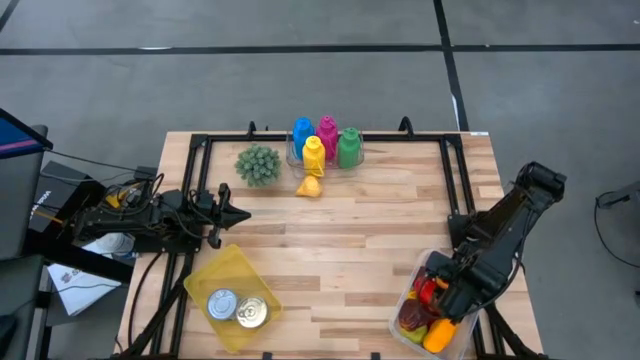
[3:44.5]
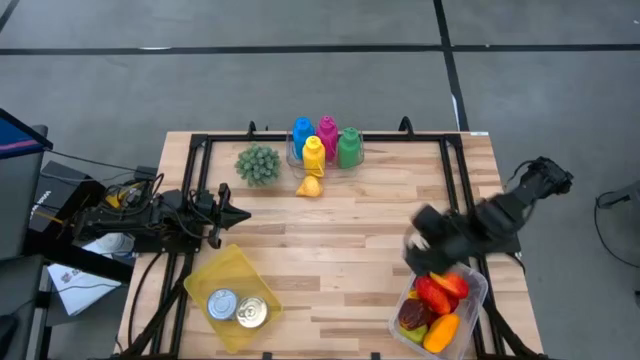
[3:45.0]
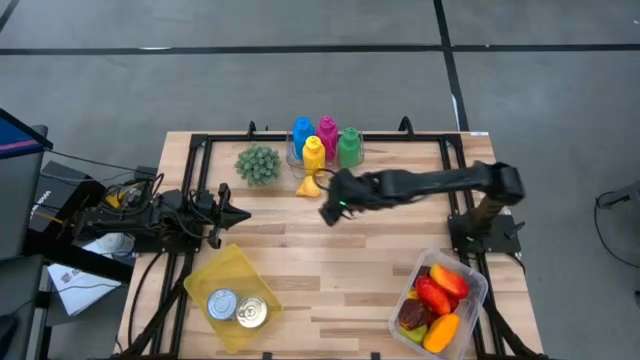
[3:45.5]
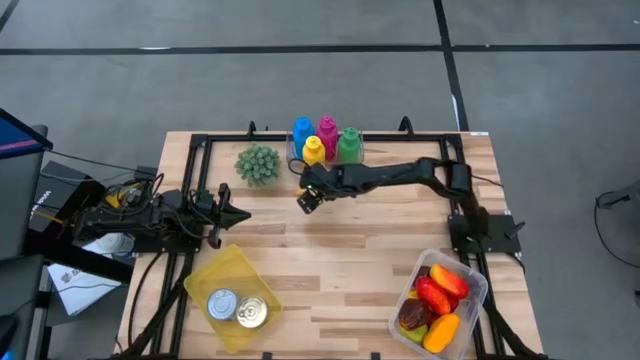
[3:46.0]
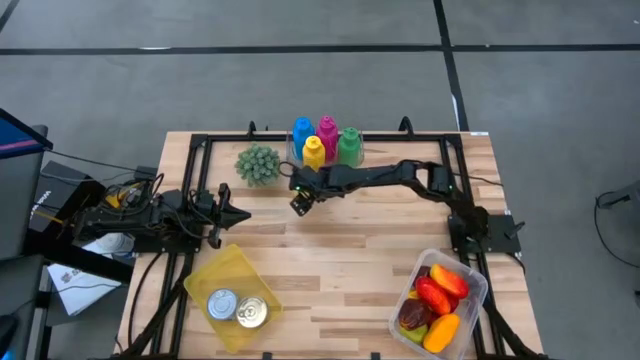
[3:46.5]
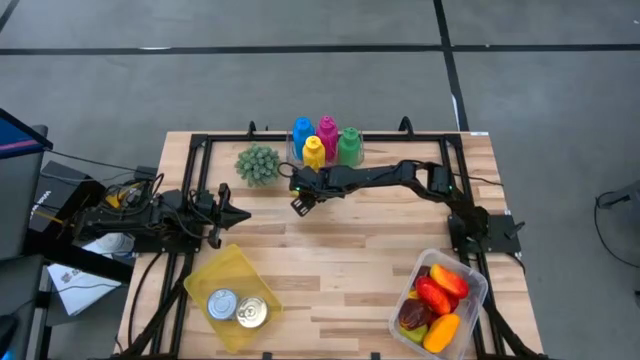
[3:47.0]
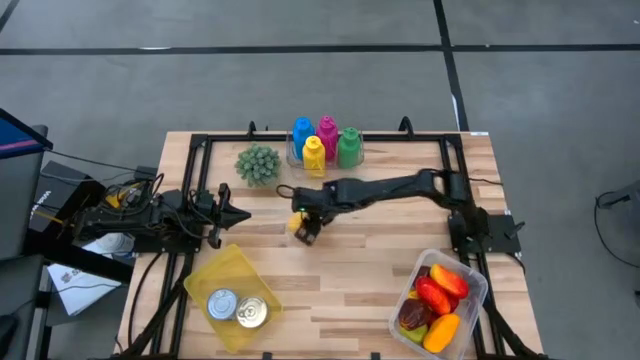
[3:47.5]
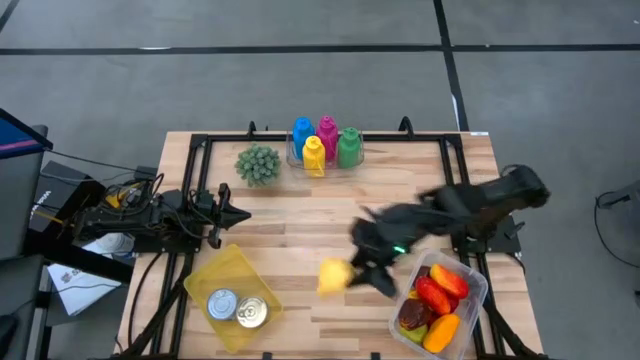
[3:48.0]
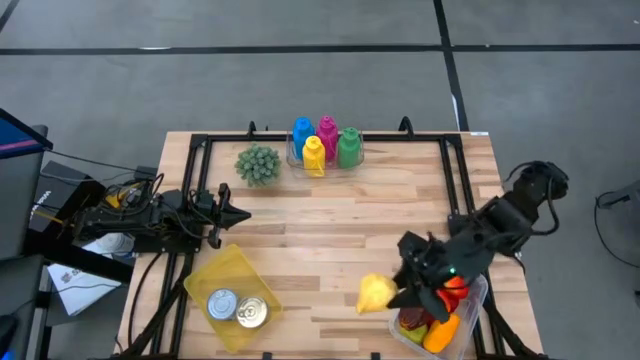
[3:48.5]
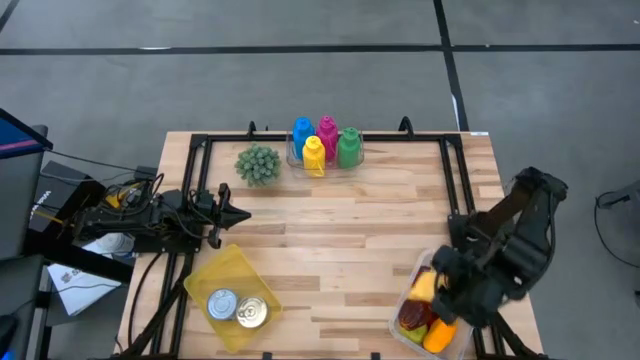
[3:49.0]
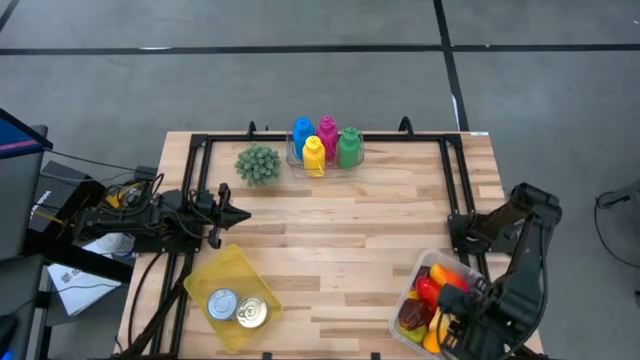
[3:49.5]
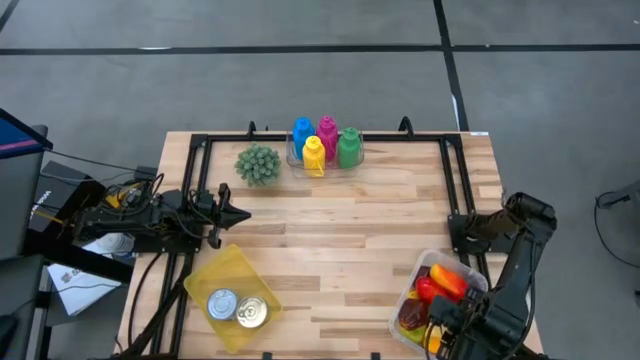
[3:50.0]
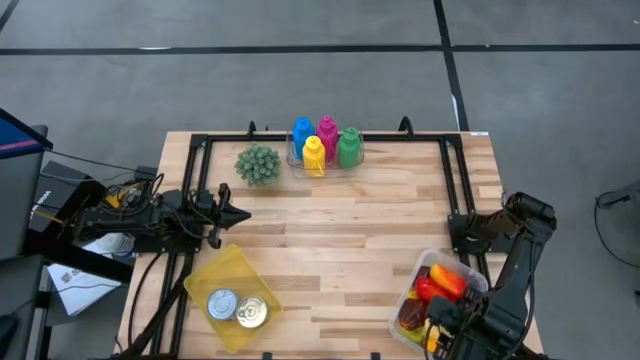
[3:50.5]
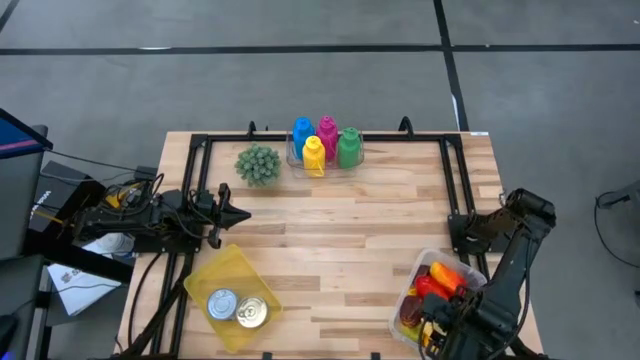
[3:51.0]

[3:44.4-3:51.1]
Task: Pick & Place Food Item
Put the yellow garlic into the white bin

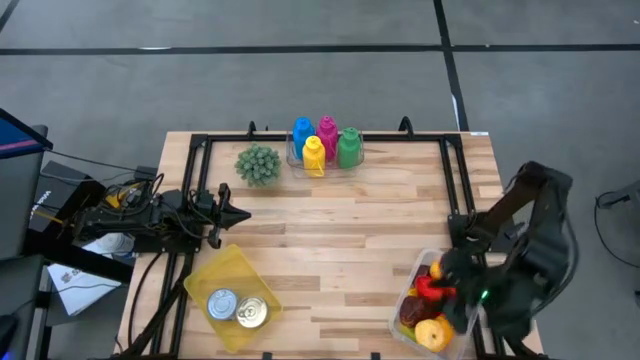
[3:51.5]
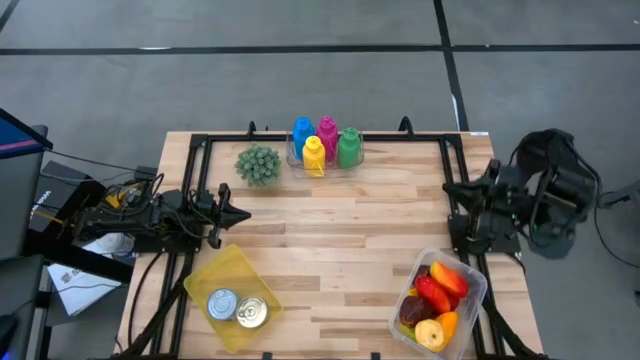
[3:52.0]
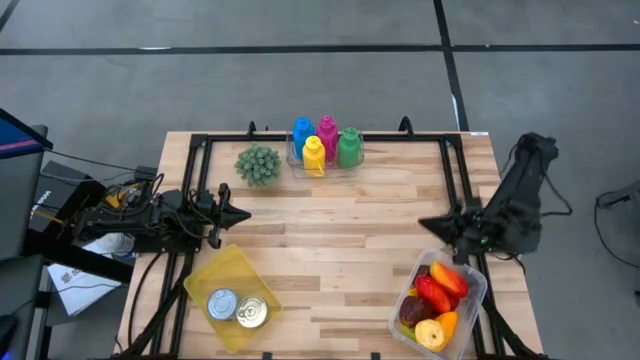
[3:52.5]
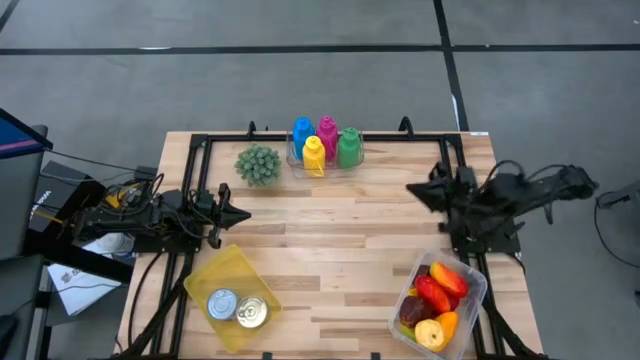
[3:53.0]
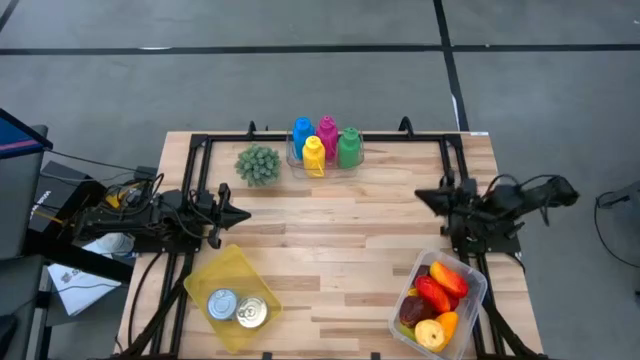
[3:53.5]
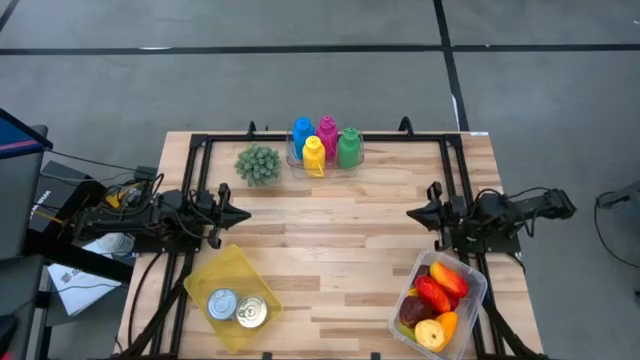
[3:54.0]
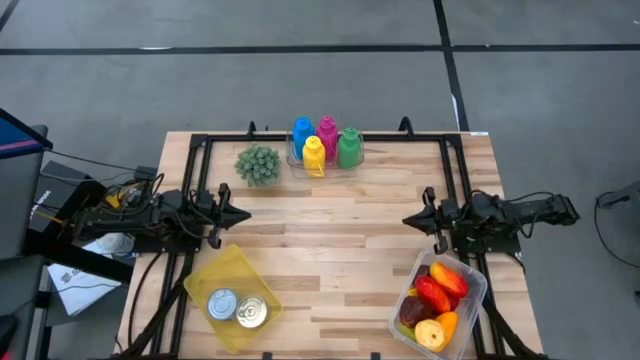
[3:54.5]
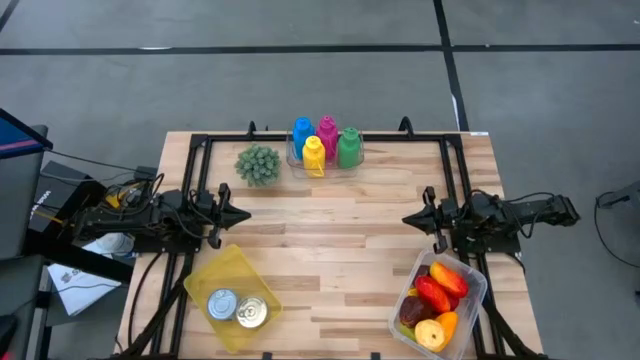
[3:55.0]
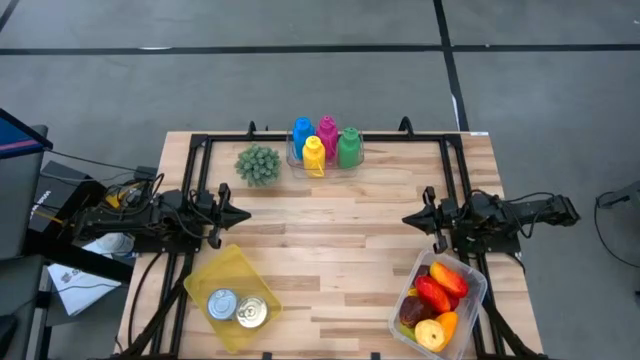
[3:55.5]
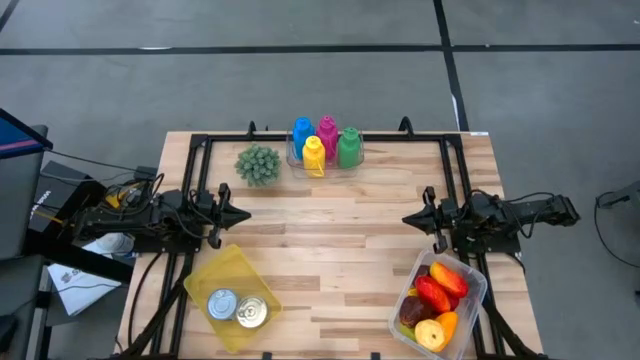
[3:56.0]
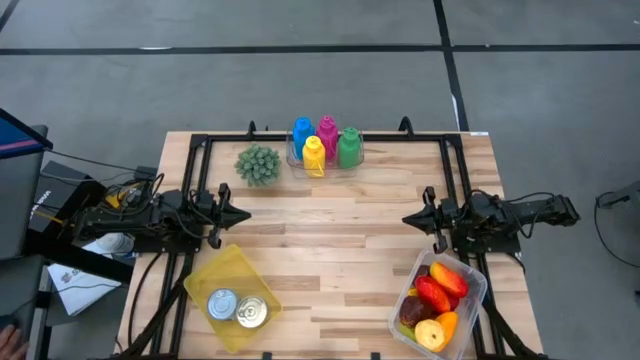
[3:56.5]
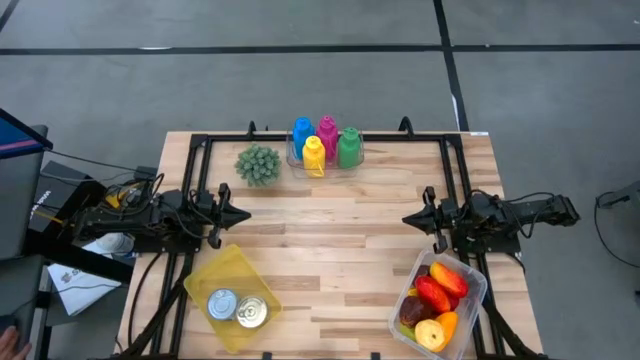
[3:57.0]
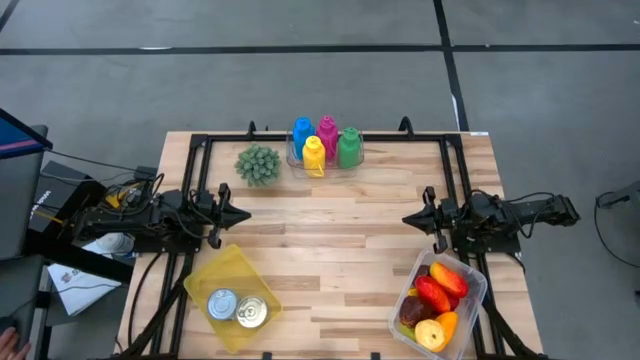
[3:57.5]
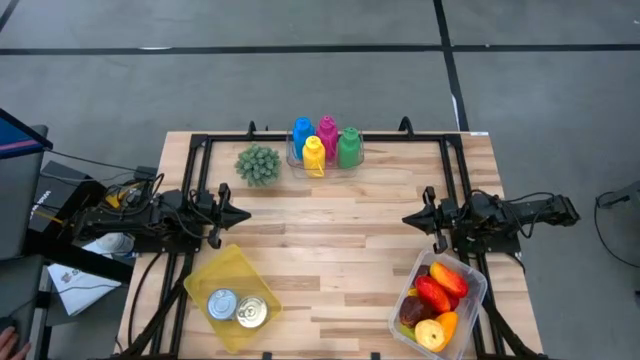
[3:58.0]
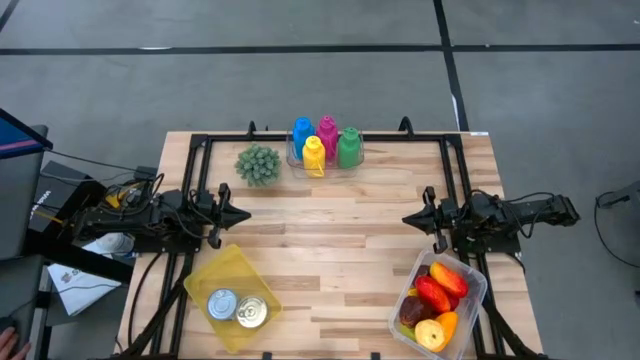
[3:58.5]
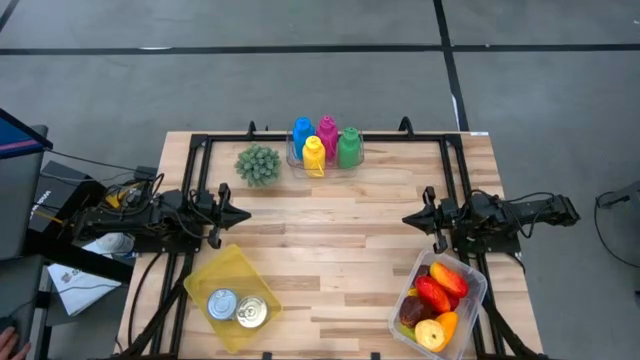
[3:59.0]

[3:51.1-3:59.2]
Return to Home Position

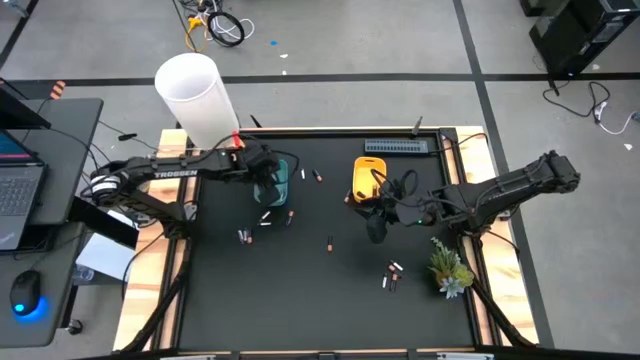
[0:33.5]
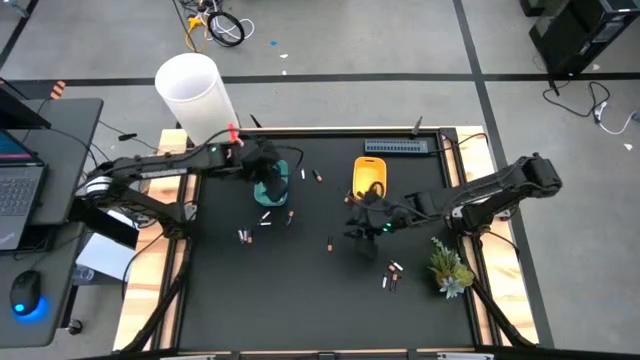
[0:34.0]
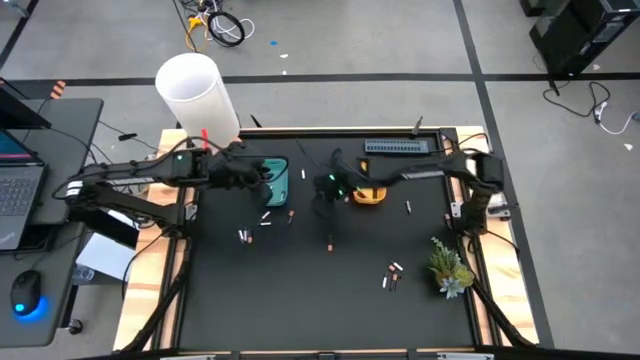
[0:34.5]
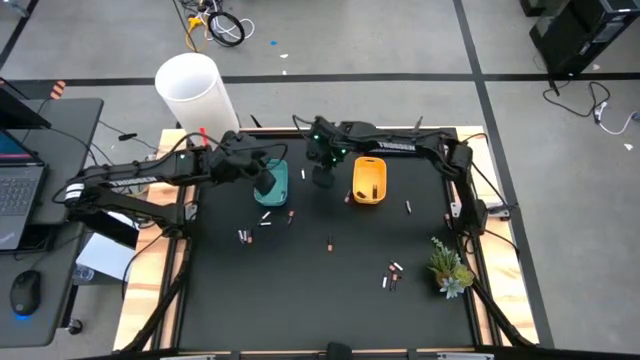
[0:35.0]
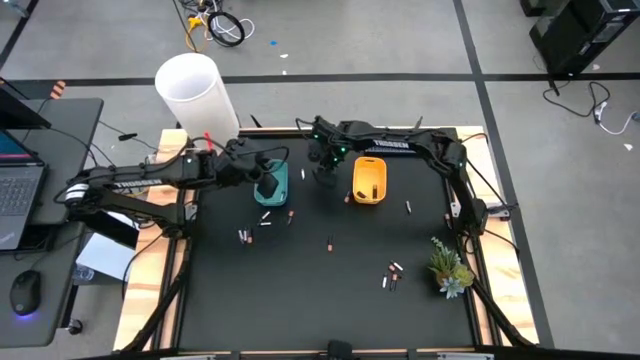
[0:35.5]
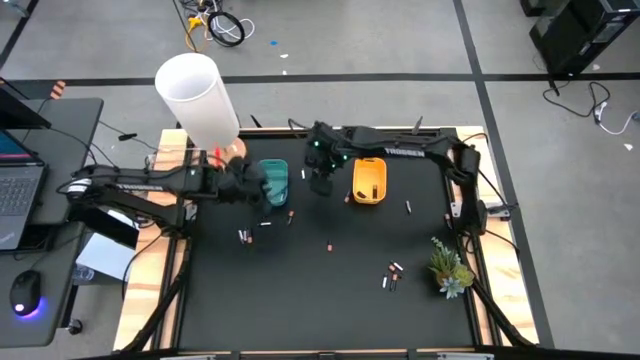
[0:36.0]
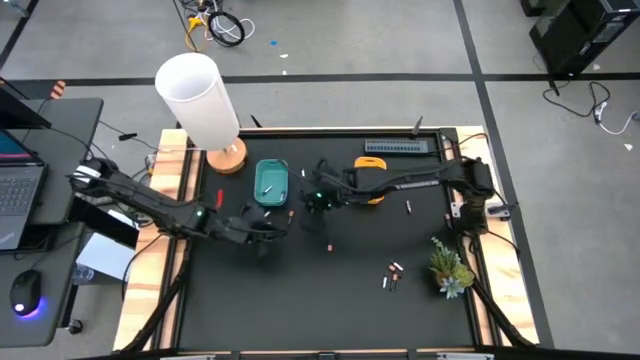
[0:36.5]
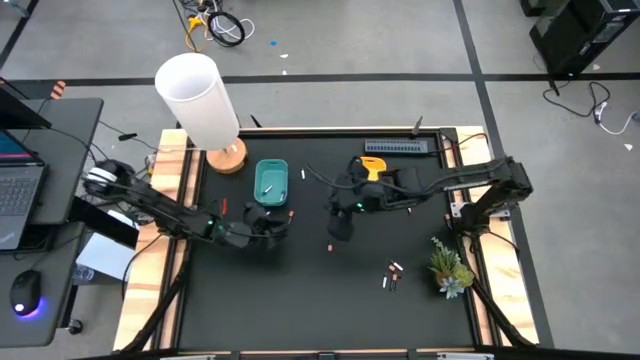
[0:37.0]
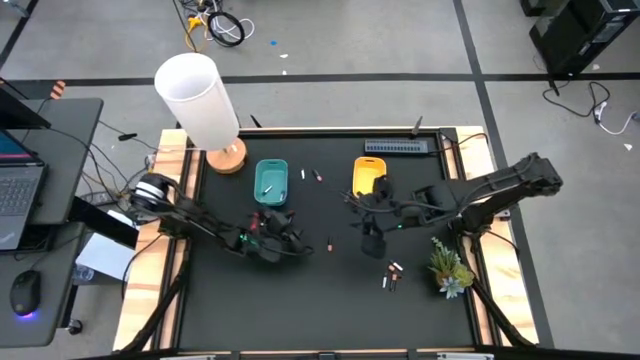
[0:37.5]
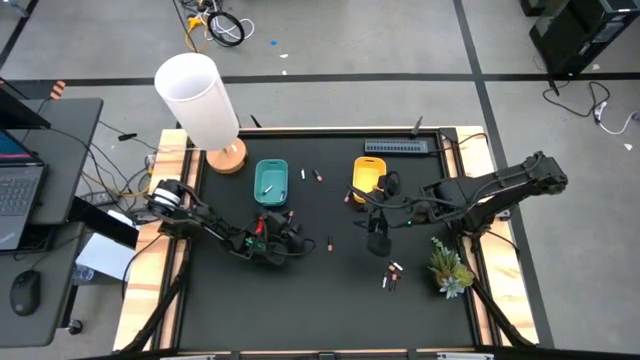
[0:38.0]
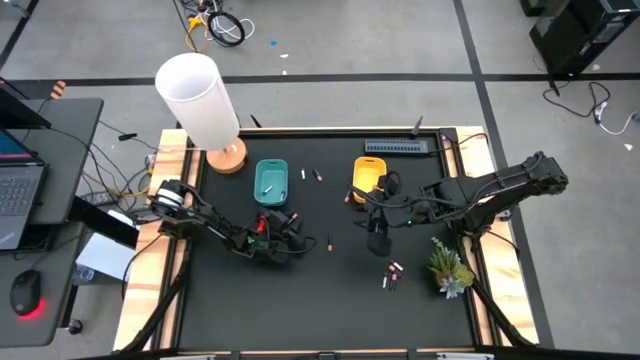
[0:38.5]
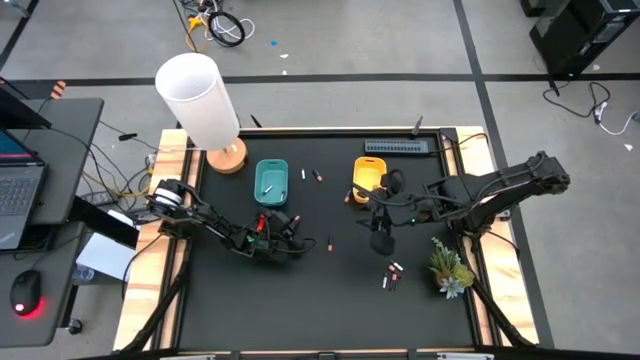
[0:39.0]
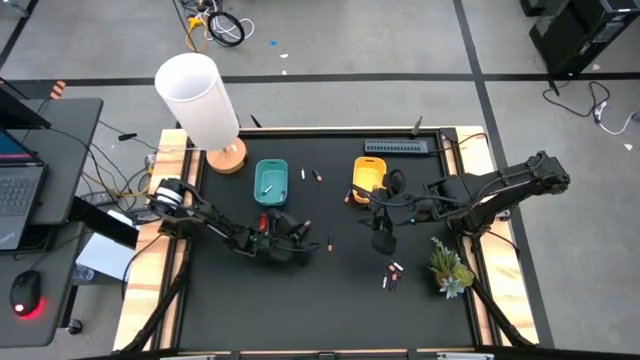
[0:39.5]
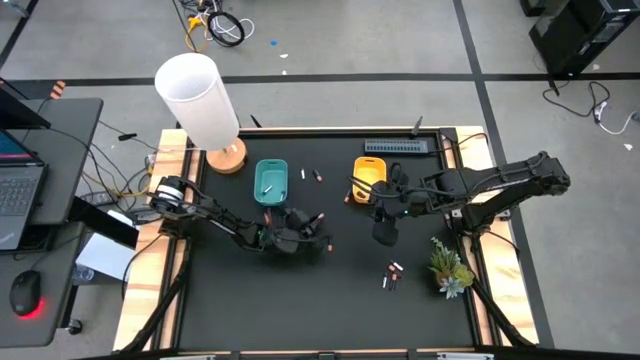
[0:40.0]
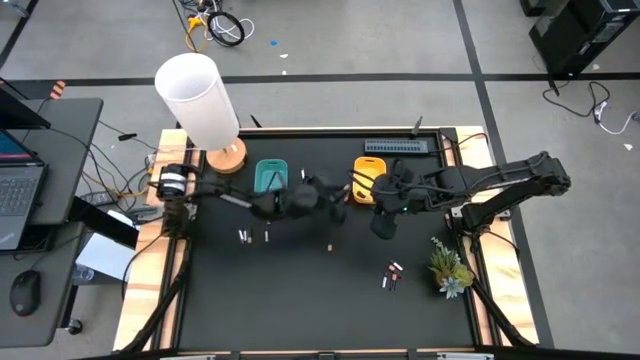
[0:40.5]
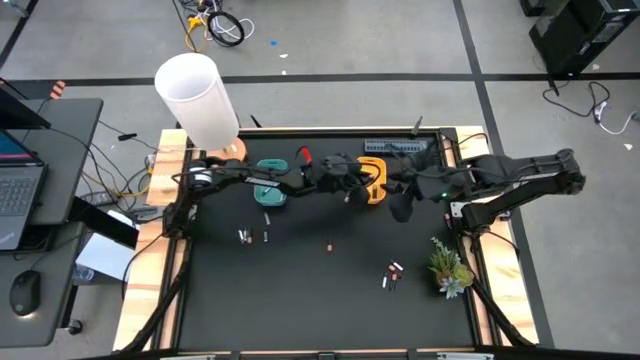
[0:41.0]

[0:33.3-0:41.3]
Task: Sort batteries
Put the black battery into the yellow bin
